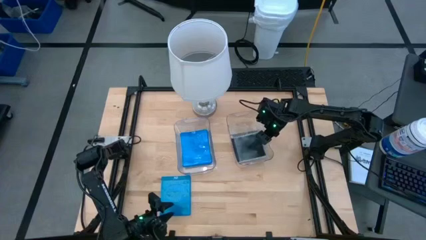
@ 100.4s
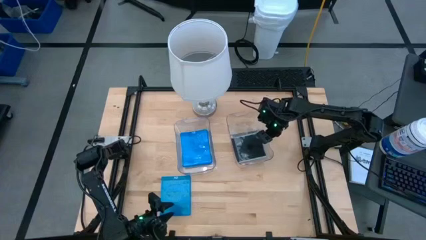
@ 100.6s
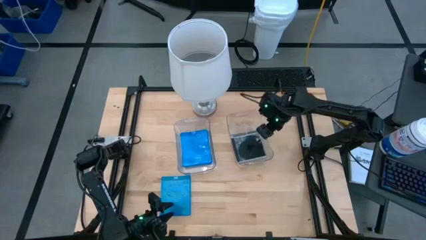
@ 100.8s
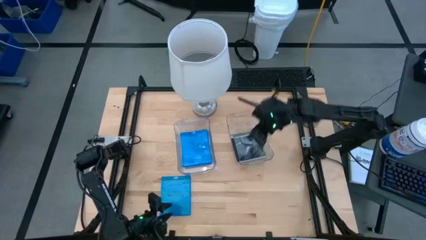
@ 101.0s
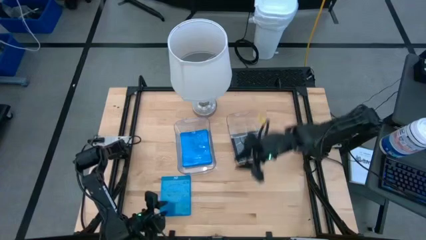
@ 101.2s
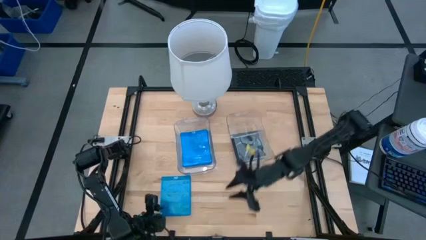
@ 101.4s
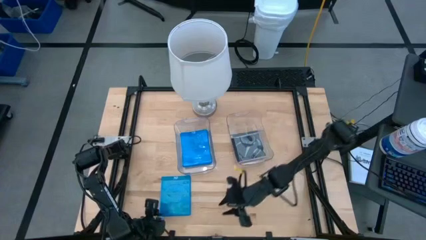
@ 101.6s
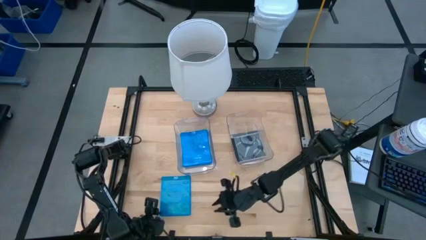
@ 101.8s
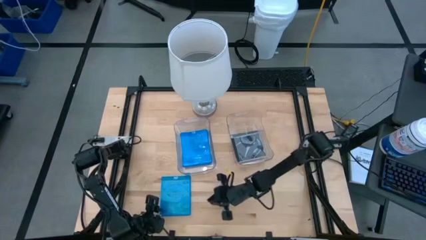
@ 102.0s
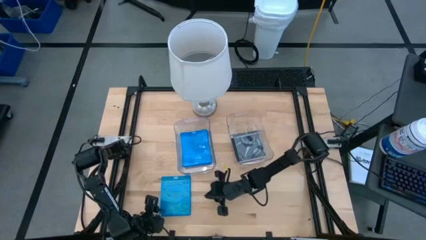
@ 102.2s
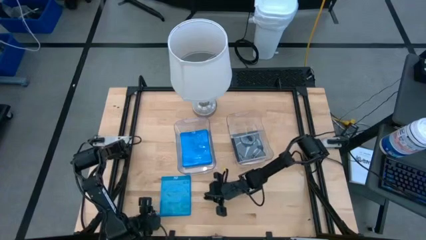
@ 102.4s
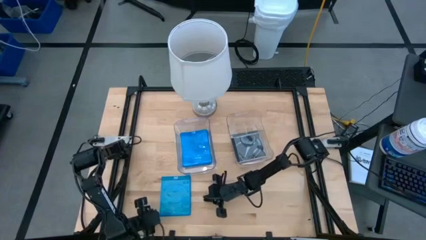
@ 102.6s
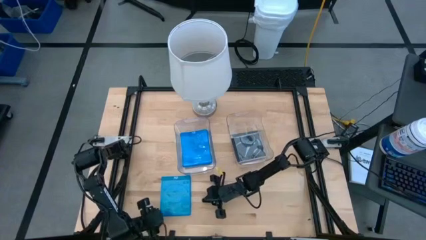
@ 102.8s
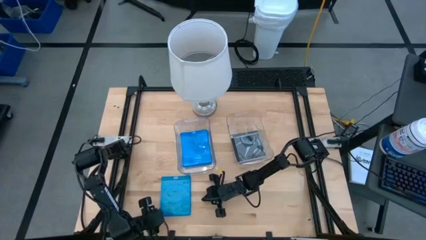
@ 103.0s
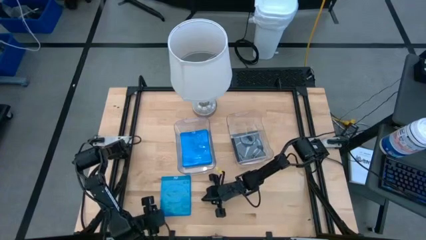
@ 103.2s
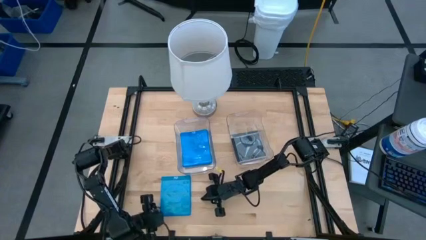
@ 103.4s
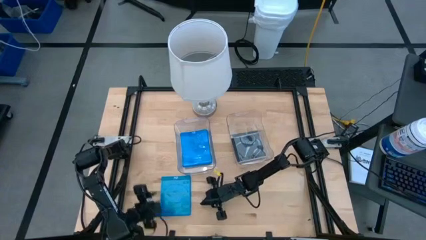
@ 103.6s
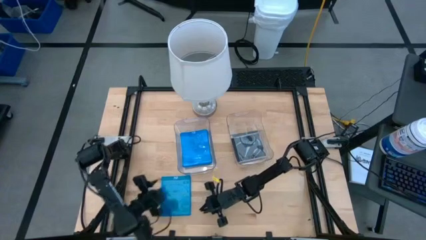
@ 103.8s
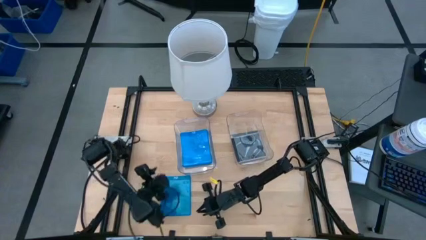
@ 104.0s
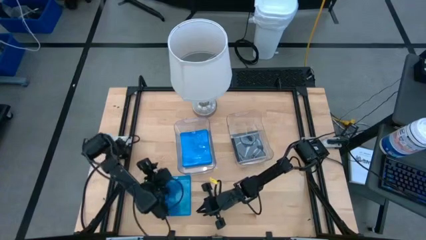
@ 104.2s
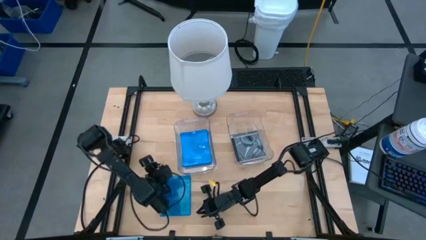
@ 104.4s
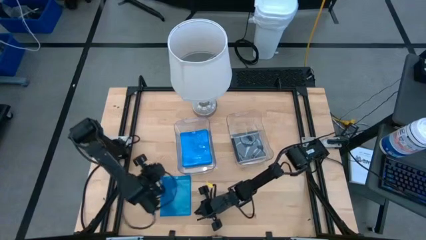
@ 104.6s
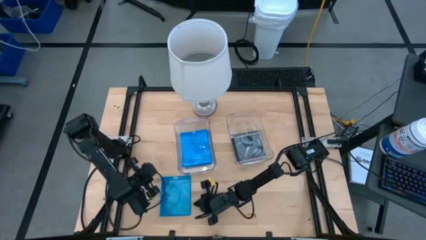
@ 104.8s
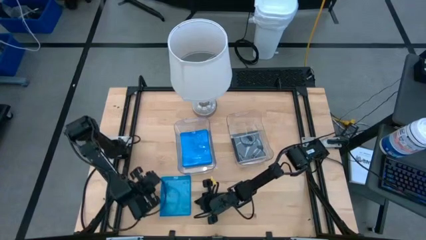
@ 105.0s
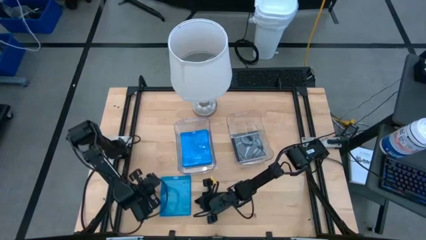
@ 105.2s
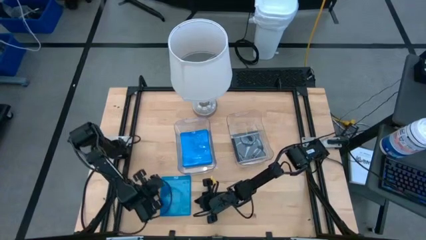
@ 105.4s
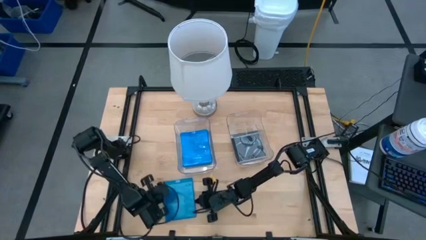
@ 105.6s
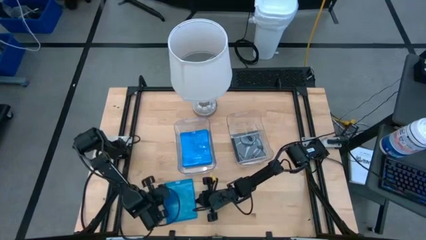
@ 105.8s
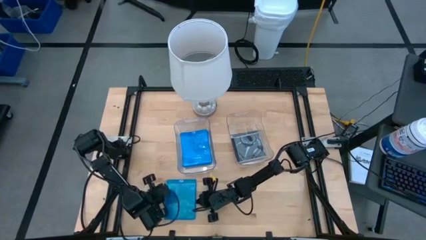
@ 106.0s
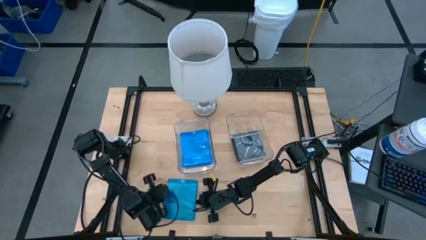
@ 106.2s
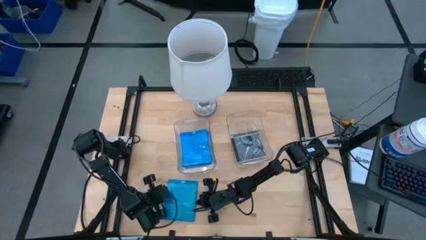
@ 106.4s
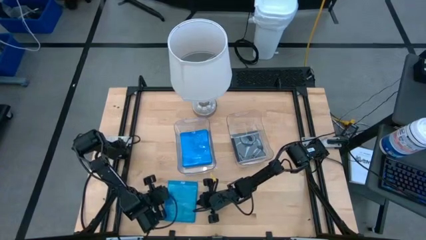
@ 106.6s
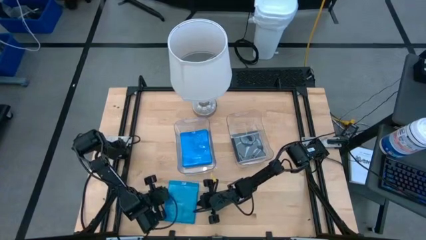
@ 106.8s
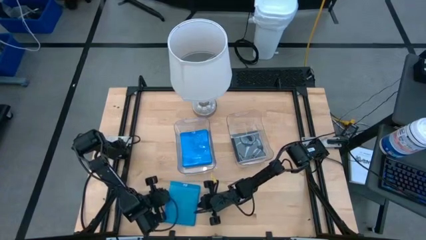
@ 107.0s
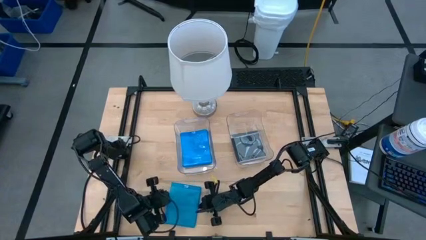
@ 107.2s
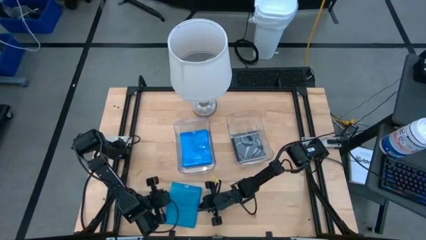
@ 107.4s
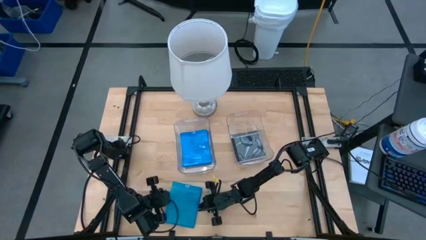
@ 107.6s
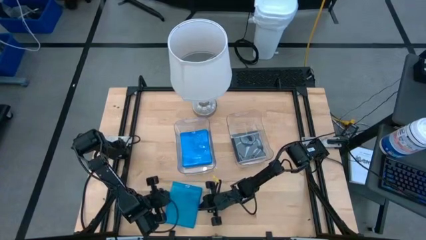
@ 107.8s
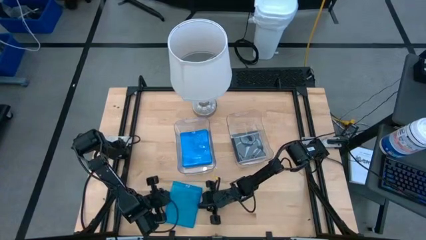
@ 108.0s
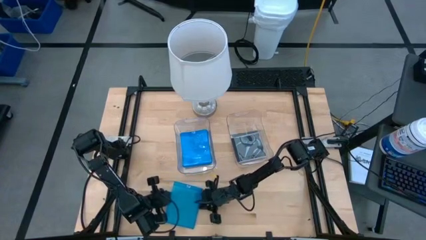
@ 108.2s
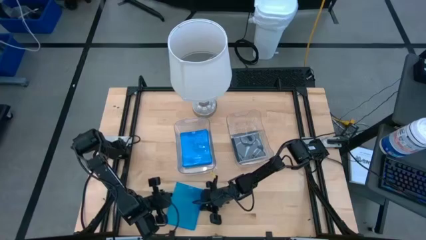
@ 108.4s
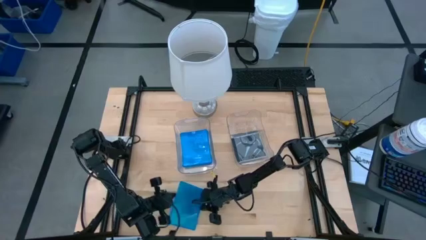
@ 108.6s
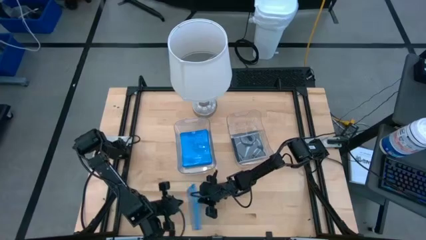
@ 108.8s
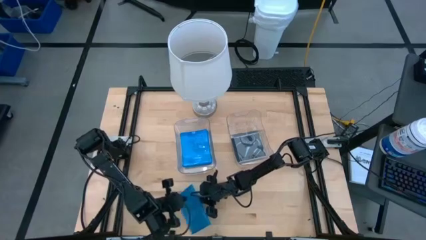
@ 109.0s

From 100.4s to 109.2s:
Task: Pick & place jewel cases by type
Put the blue CD case into the left transparent bin

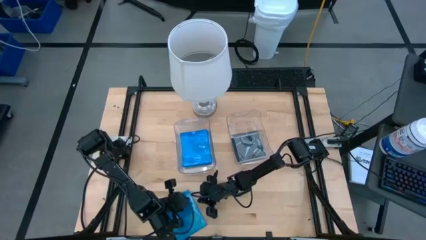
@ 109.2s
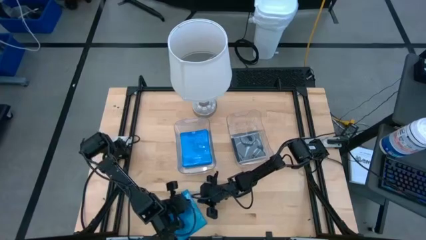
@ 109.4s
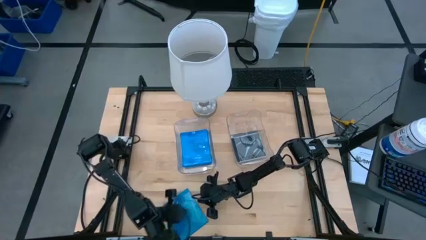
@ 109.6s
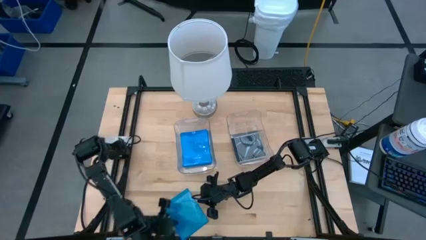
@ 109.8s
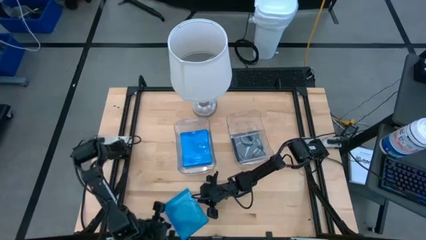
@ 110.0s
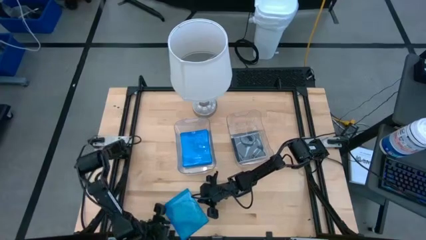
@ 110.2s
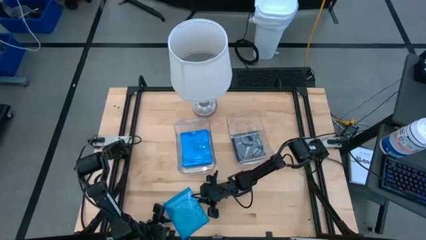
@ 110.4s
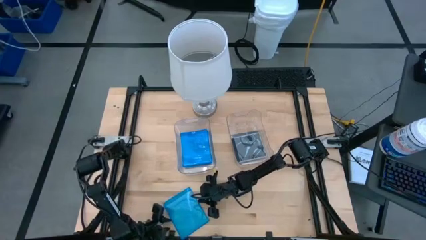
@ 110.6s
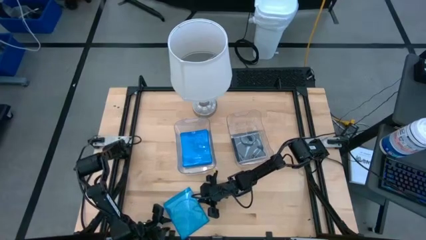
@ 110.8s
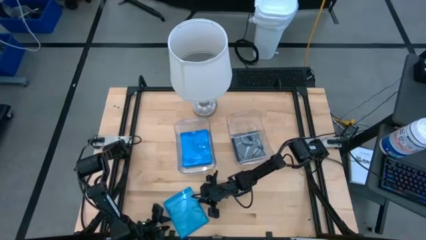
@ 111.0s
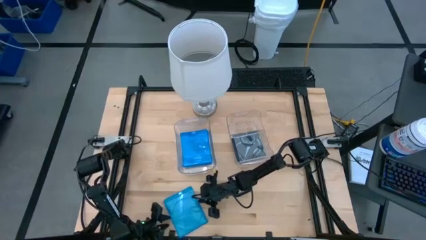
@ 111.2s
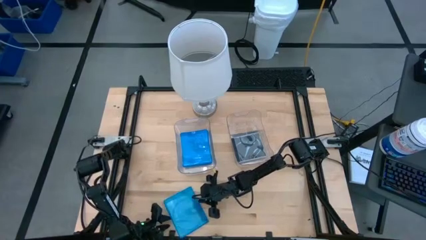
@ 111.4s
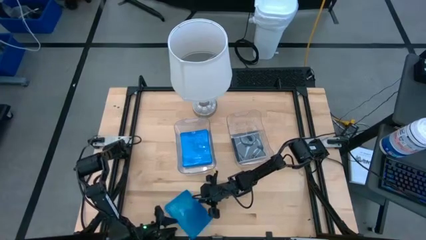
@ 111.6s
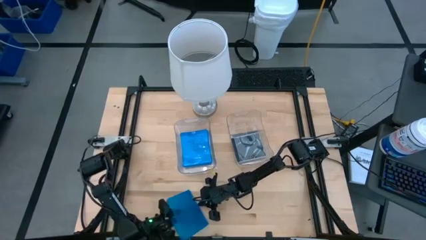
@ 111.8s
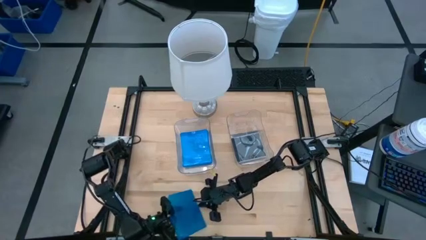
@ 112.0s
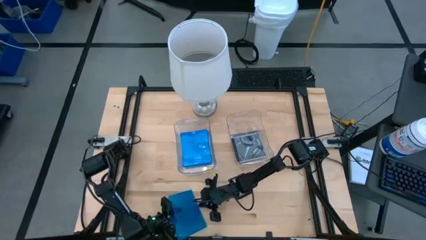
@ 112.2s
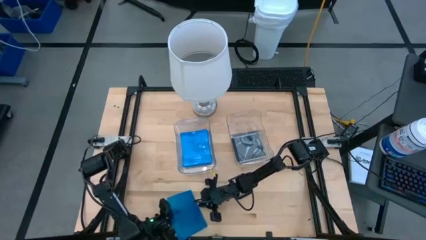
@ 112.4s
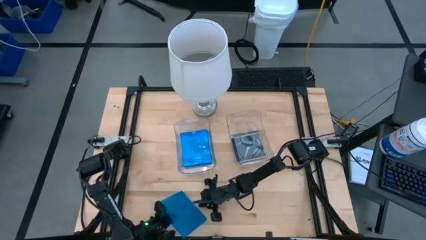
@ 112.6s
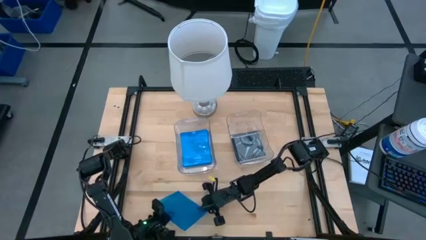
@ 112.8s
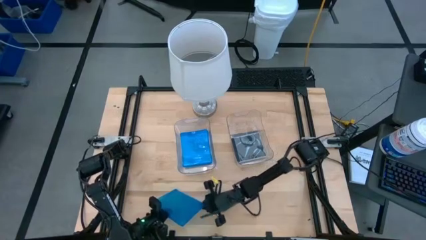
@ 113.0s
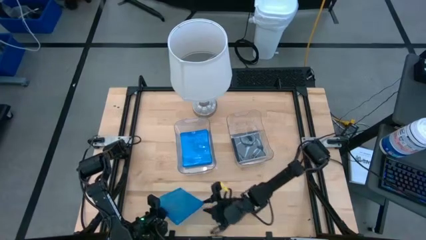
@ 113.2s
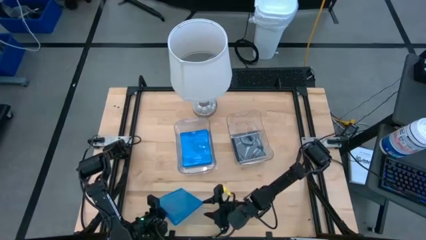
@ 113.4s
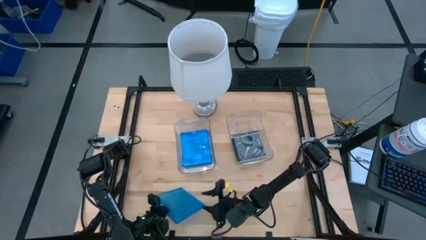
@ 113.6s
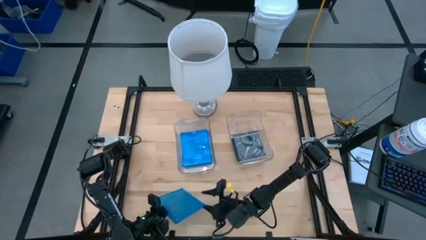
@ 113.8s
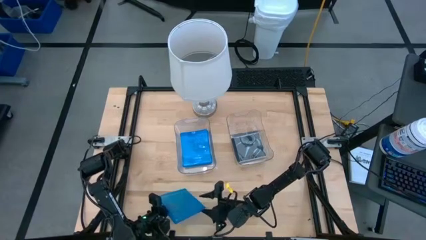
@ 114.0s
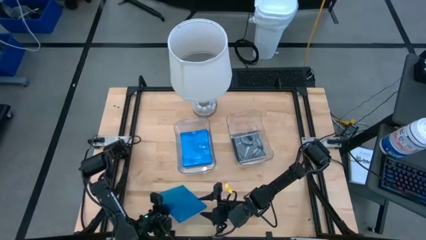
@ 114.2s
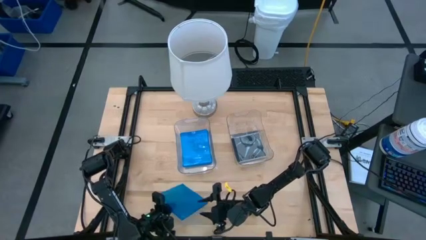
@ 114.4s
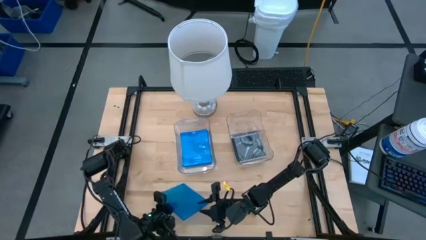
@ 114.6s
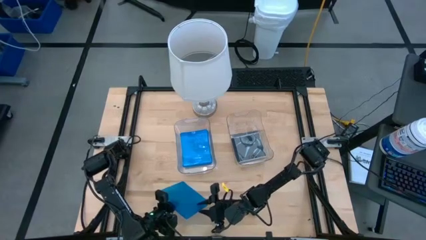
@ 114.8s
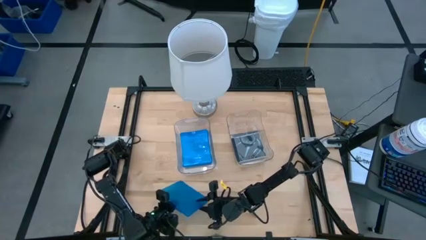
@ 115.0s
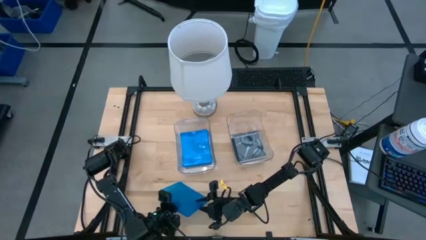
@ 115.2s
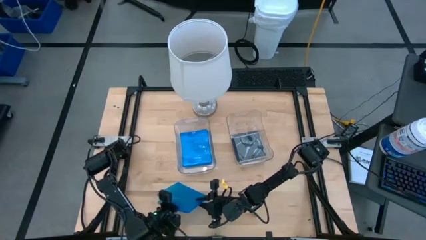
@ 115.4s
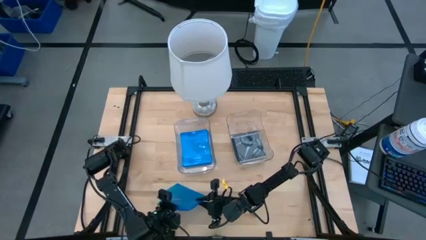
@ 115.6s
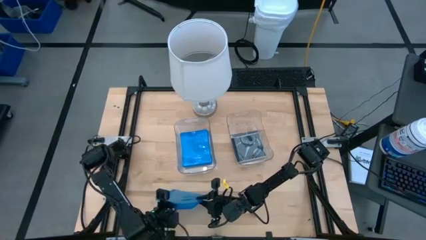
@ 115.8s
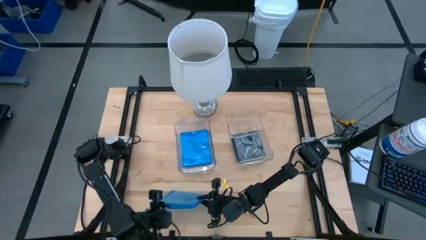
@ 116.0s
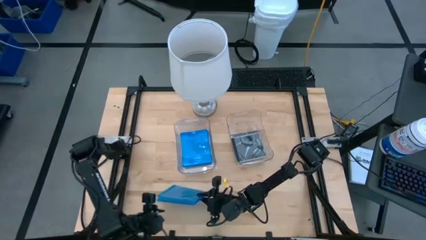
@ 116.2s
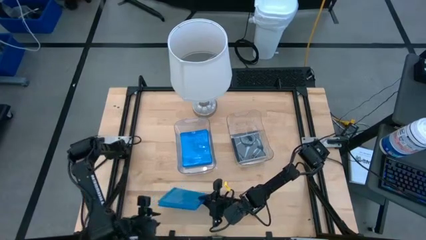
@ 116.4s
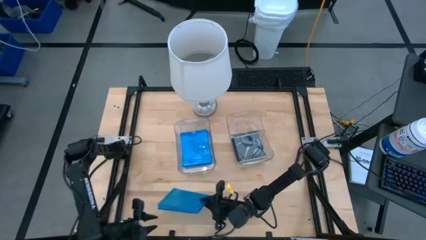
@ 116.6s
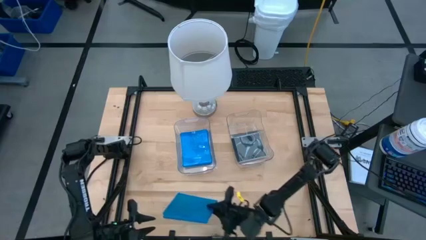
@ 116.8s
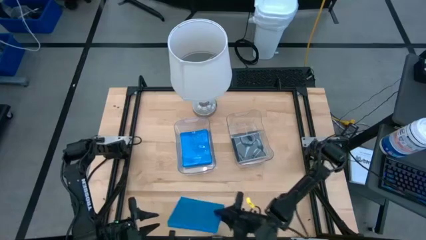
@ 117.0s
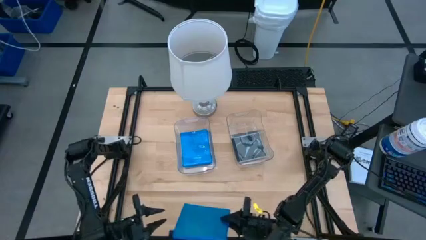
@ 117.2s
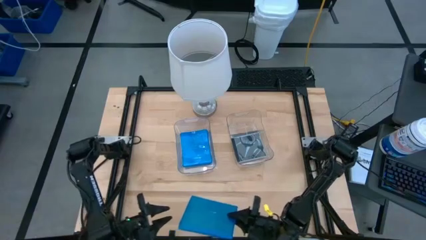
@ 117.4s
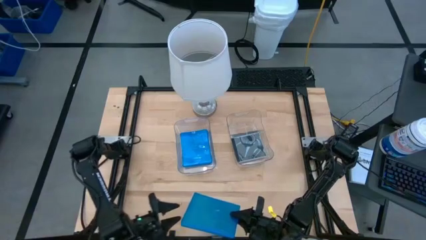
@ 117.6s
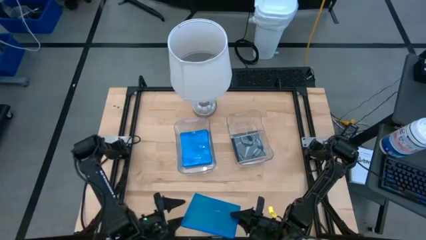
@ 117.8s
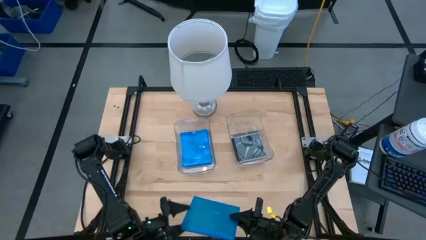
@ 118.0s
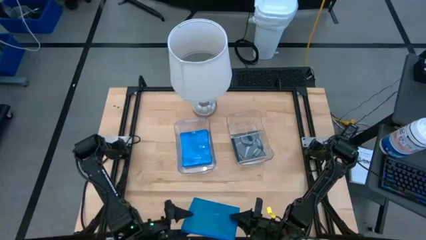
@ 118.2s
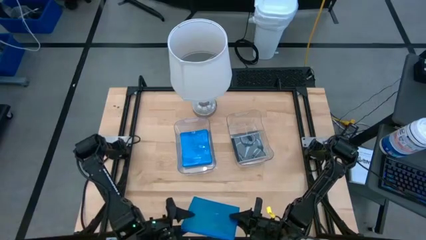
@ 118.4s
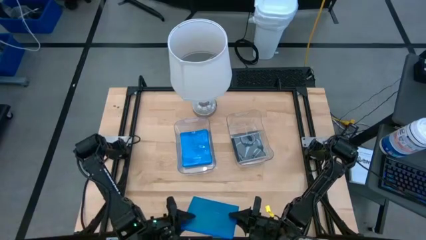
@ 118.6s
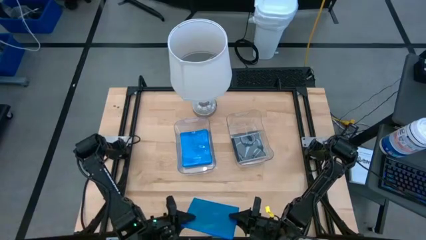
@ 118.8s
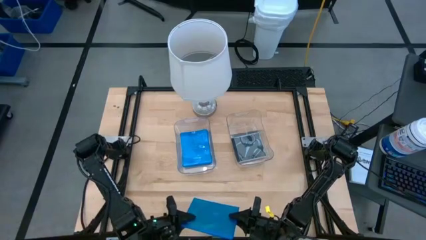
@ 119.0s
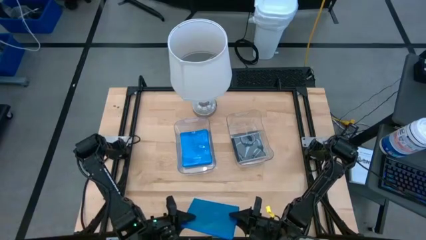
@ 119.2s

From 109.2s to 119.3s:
Put the blue CD case into the left transparent bin
